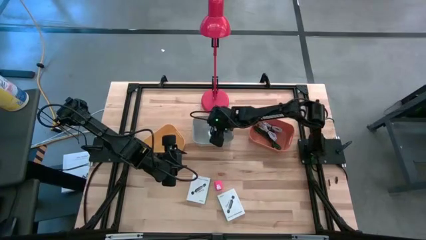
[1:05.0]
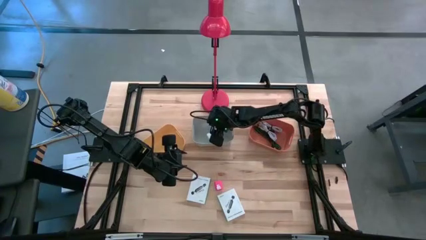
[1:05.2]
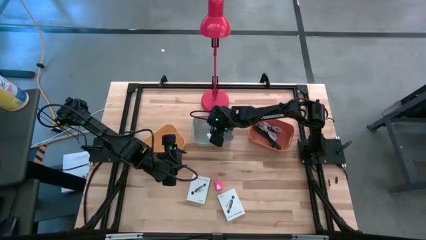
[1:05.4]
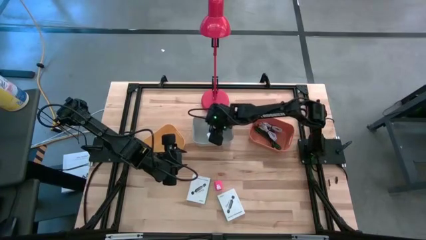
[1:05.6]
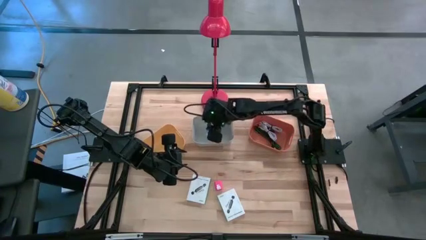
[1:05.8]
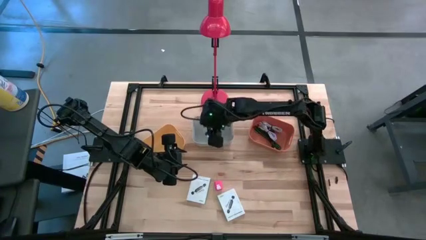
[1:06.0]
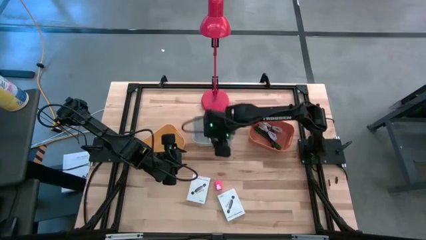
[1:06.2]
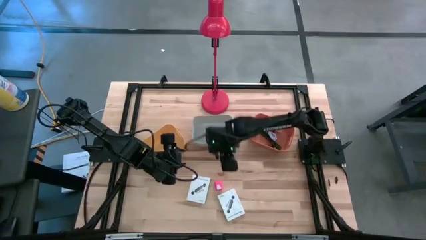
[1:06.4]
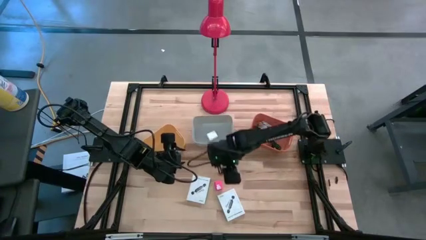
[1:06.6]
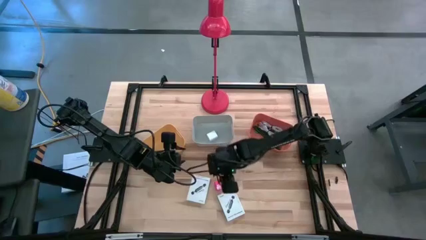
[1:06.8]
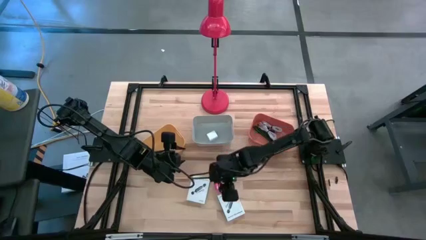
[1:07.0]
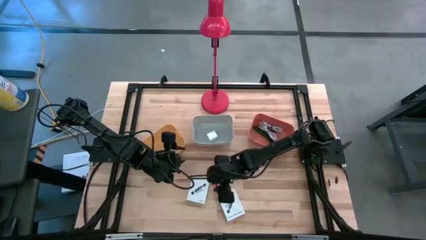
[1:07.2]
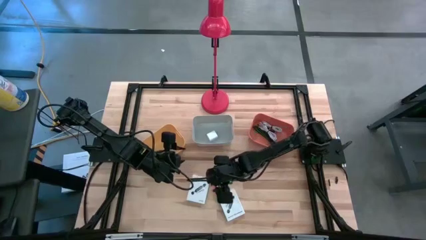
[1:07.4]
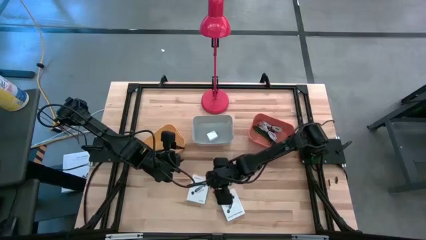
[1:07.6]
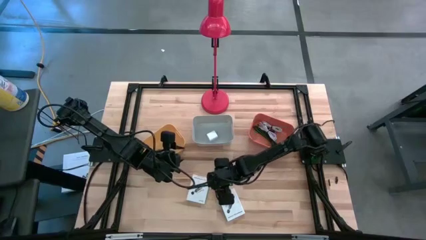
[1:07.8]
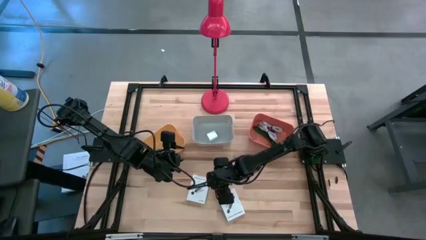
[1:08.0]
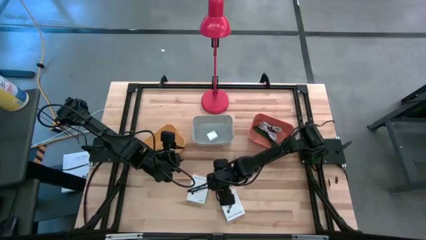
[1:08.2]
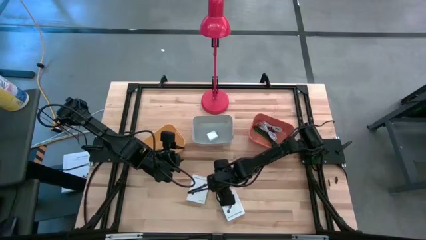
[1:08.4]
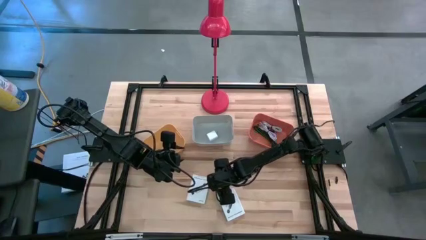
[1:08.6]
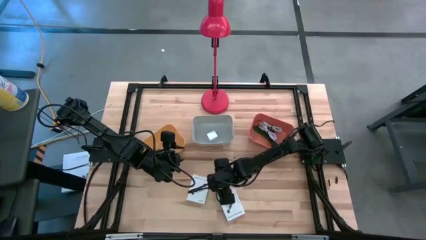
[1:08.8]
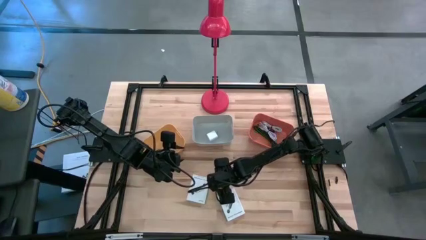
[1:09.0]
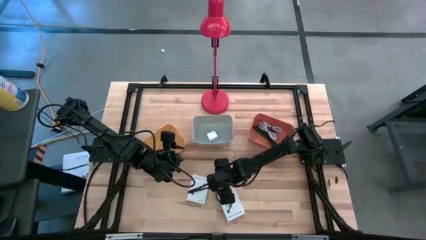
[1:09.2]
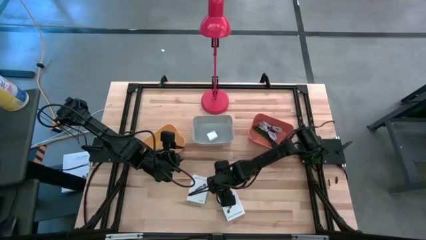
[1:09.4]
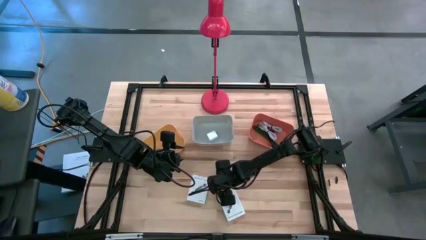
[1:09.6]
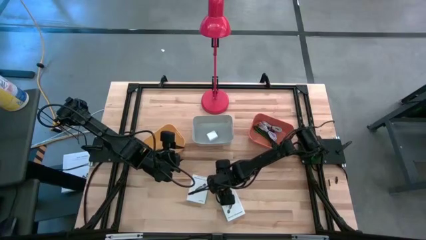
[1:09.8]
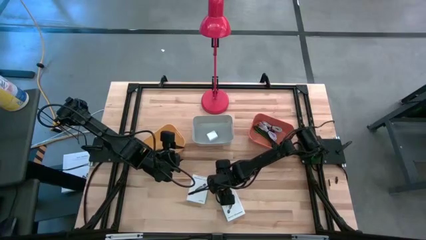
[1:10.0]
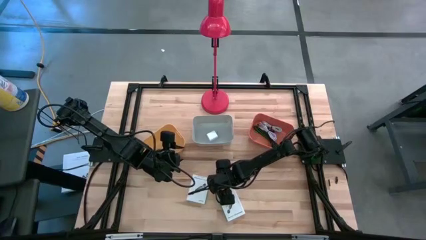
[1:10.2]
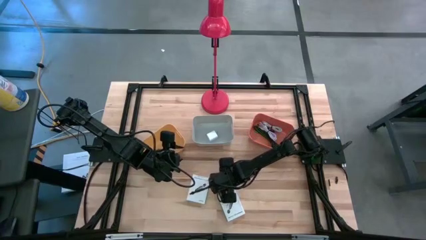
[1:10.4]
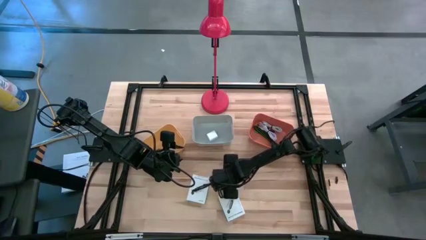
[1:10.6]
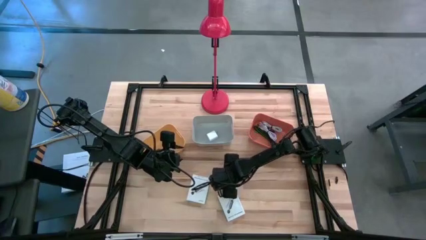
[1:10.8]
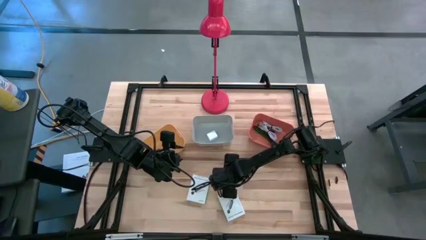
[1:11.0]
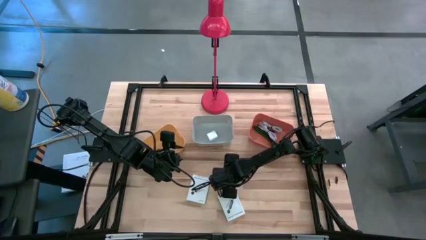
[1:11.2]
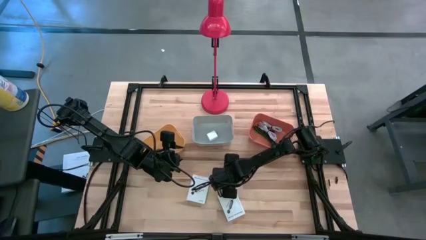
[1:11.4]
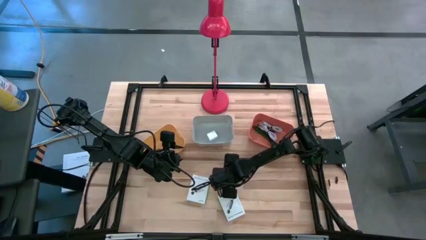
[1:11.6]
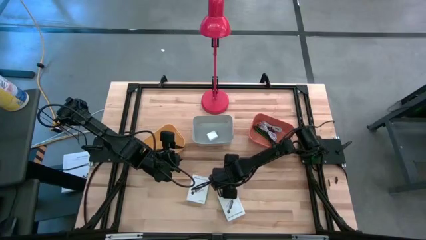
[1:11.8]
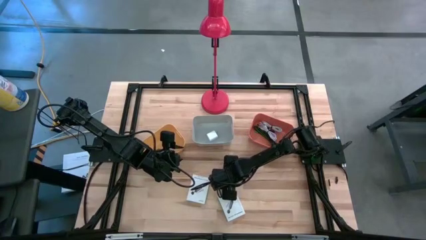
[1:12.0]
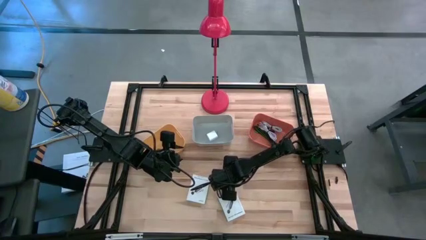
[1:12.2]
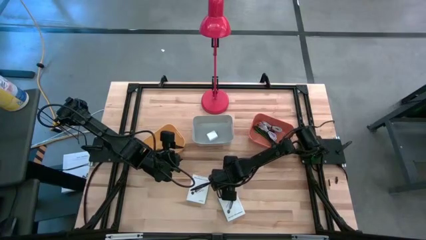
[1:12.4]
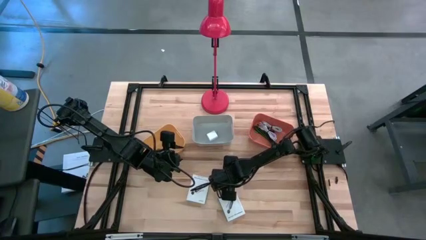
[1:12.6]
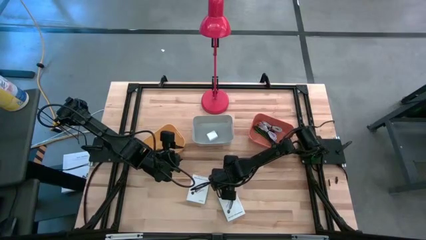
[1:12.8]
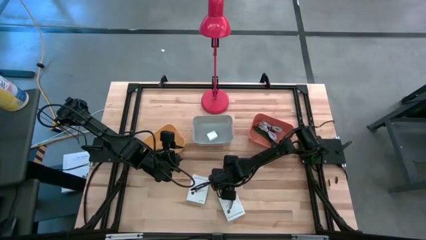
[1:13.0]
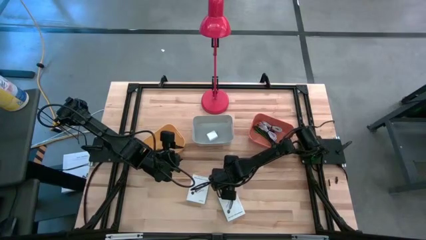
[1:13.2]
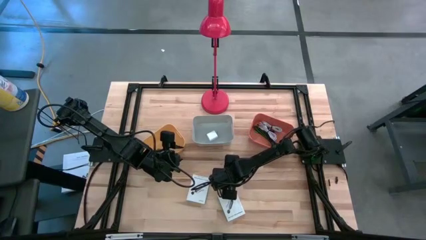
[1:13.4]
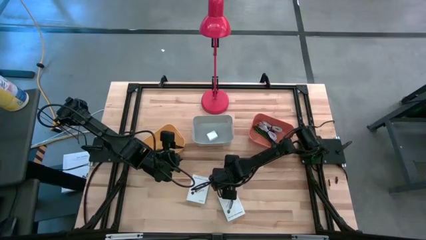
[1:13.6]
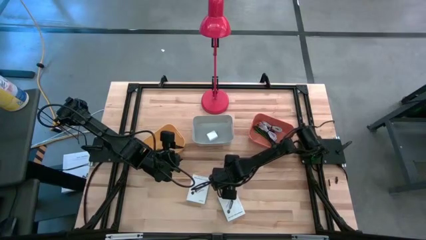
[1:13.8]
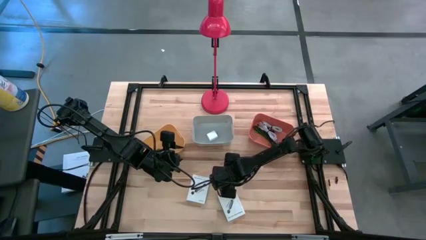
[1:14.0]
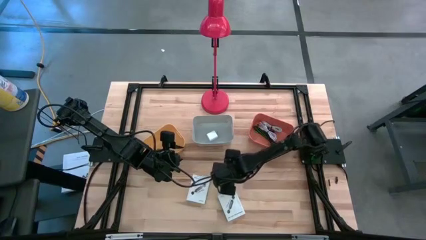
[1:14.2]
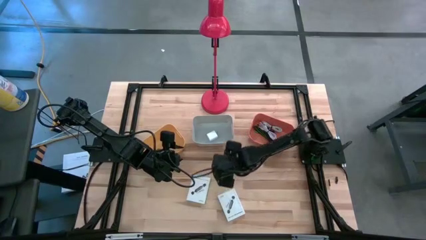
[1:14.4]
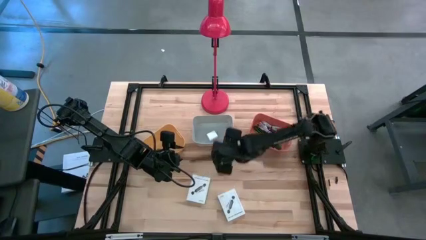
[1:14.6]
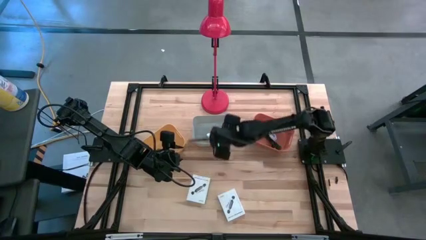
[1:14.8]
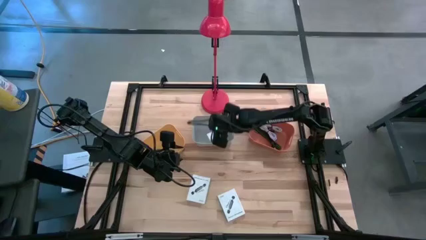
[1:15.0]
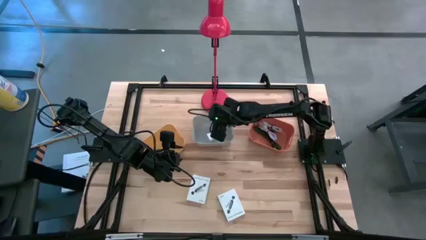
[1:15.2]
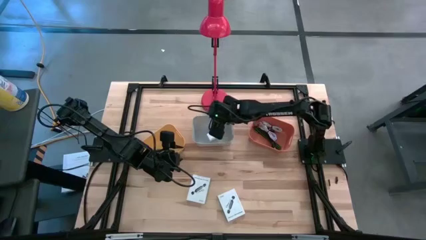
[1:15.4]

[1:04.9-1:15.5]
Task: Pick and place items into bin
Put the pink charger adapter into the gray bin

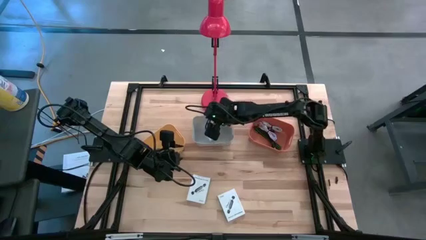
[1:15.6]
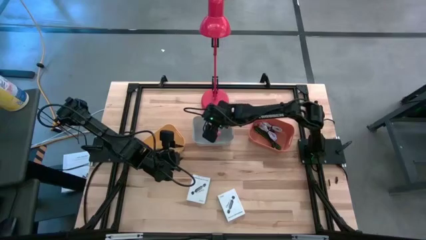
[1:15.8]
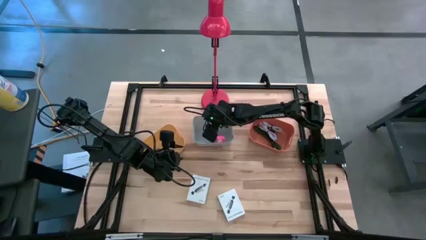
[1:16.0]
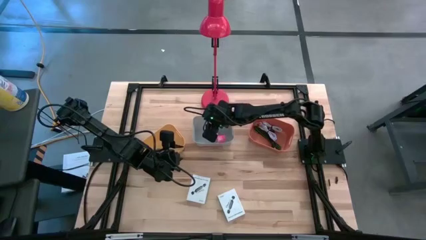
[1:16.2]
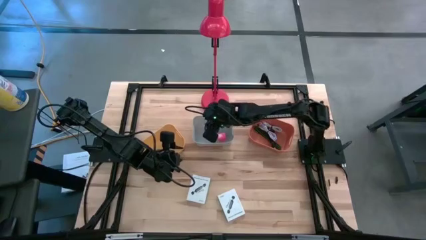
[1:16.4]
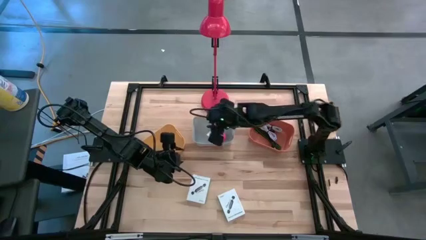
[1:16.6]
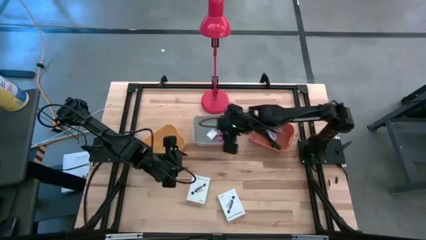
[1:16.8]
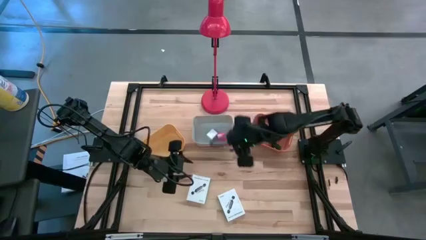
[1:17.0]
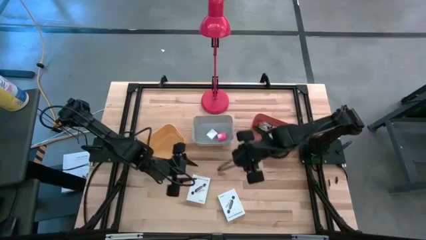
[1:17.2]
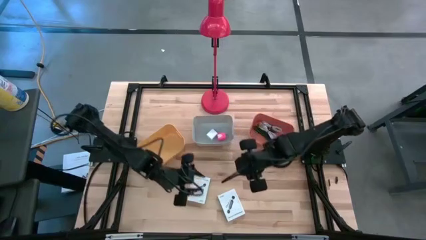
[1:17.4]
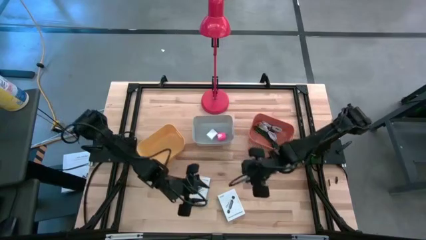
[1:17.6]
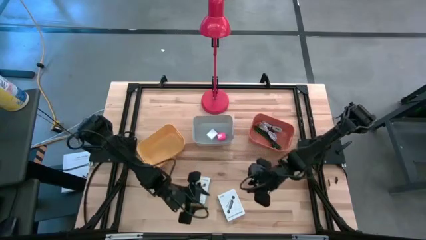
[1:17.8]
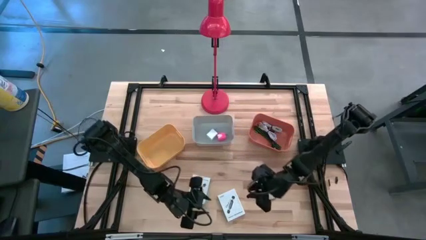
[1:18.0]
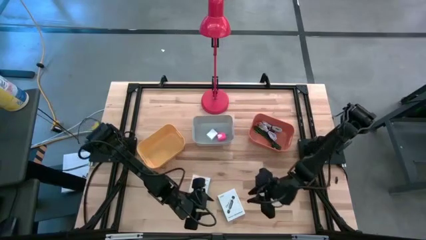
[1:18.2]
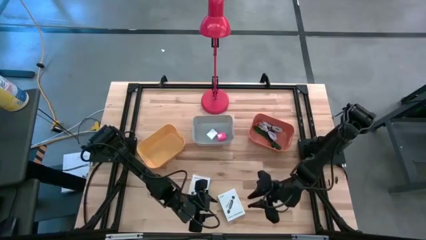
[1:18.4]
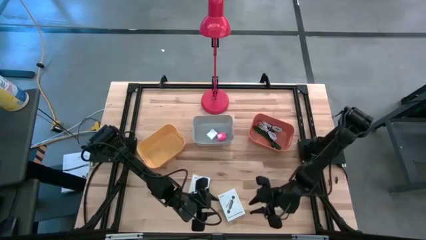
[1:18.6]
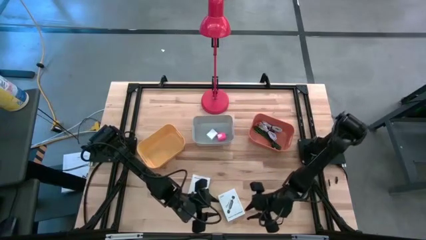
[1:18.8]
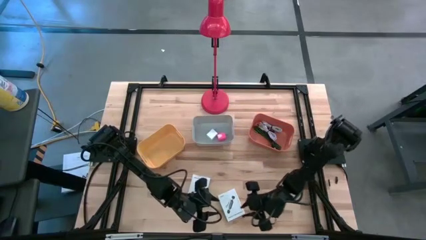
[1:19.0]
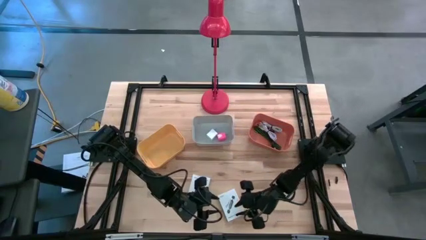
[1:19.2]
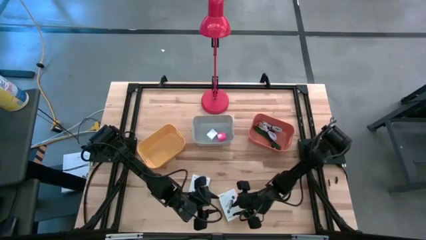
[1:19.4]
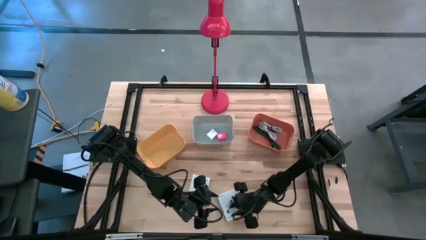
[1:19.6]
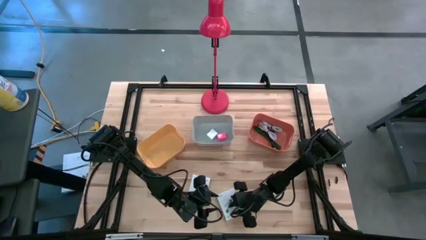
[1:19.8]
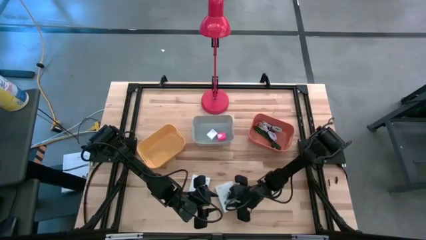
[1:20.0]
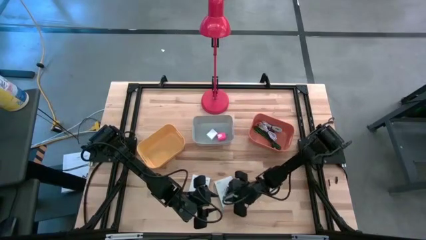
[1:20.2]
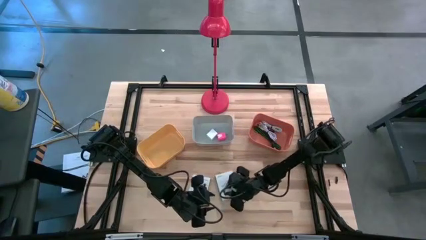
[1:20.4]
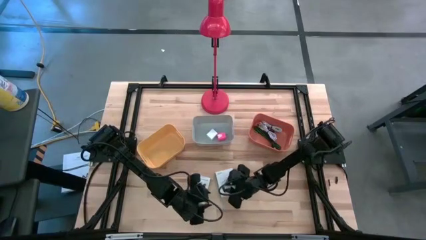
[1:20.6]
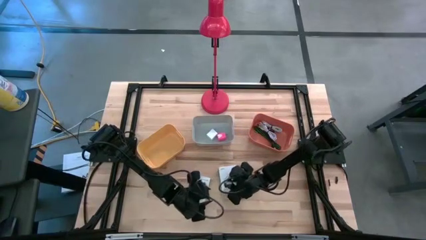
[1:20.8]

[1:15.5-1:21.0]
Adjust the right white card reader
